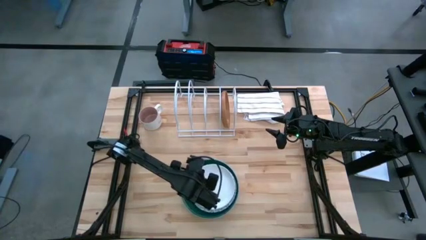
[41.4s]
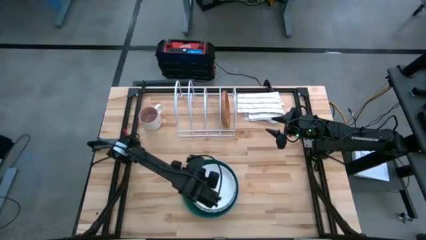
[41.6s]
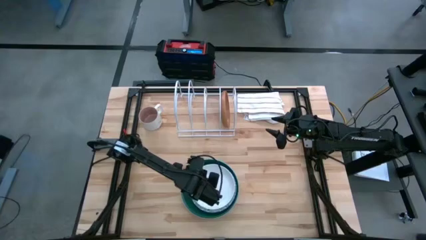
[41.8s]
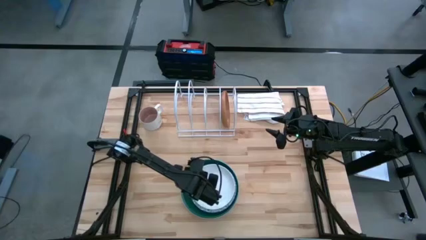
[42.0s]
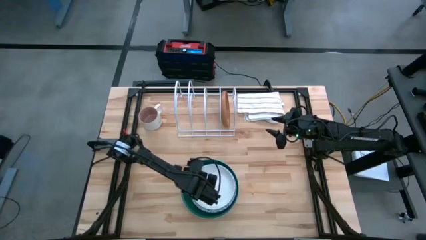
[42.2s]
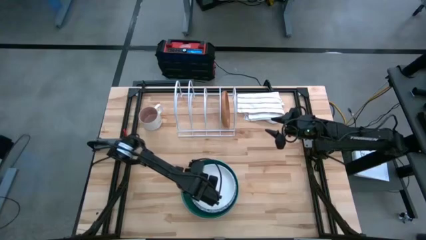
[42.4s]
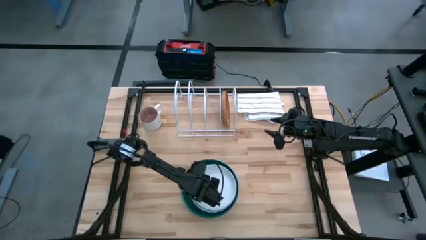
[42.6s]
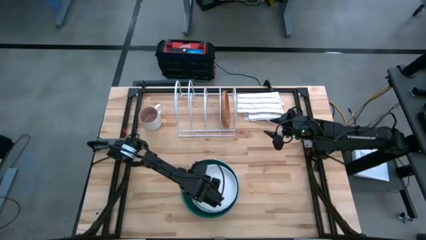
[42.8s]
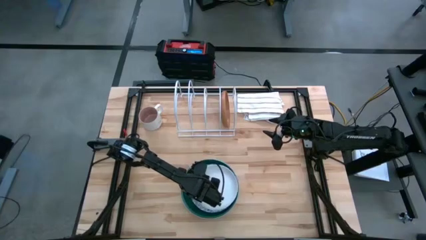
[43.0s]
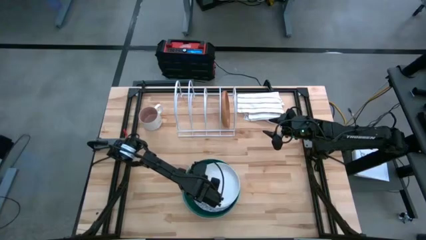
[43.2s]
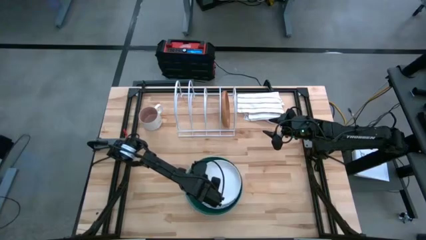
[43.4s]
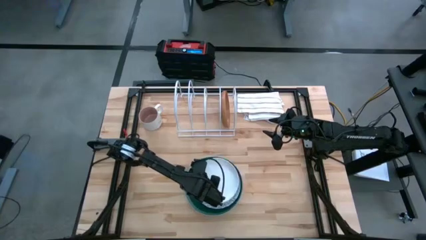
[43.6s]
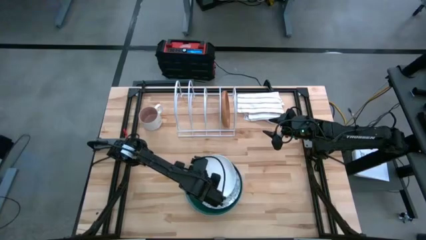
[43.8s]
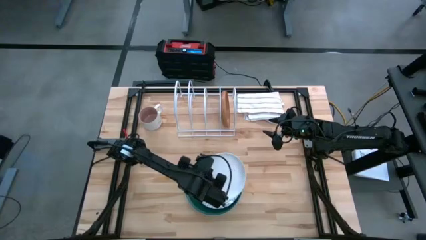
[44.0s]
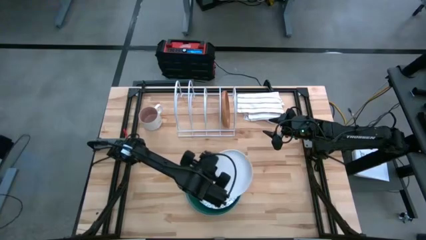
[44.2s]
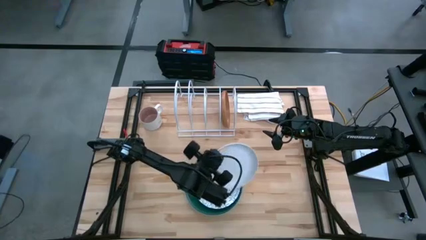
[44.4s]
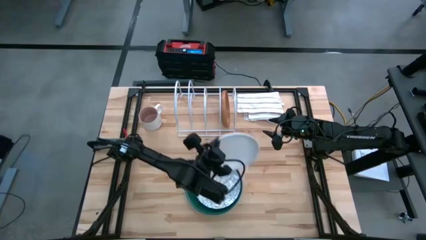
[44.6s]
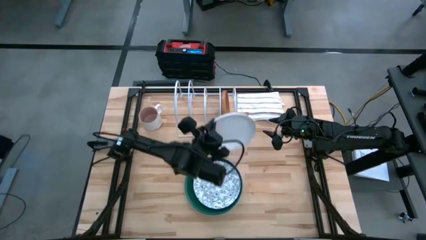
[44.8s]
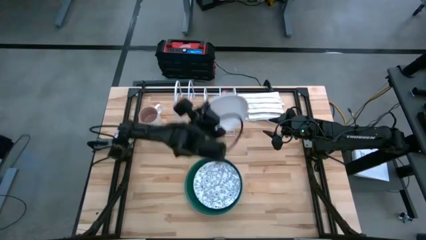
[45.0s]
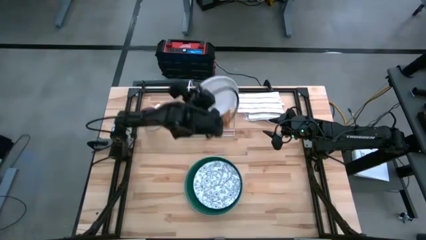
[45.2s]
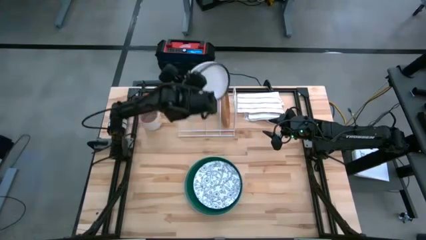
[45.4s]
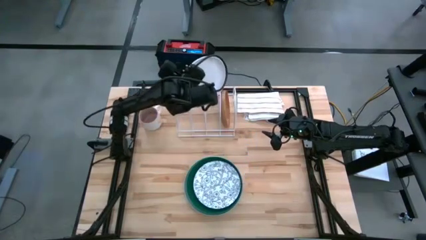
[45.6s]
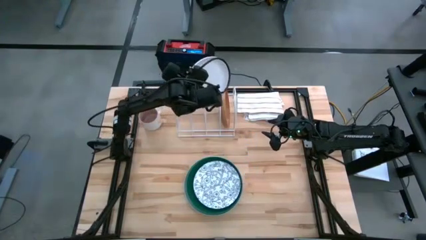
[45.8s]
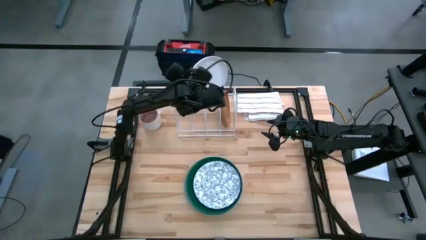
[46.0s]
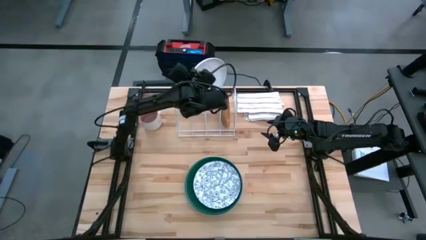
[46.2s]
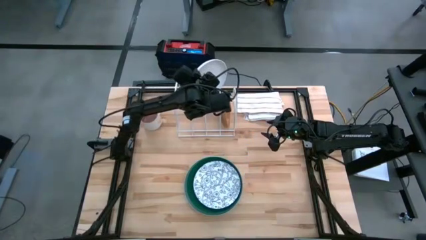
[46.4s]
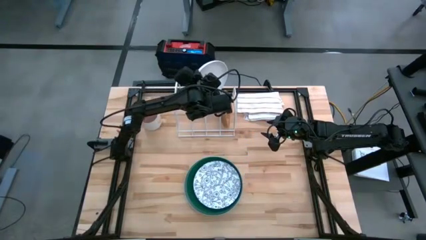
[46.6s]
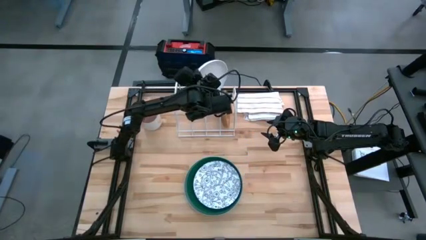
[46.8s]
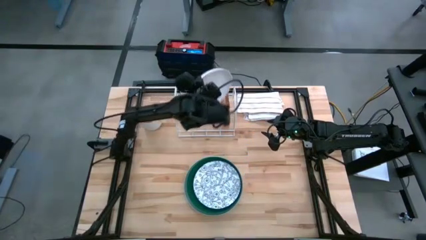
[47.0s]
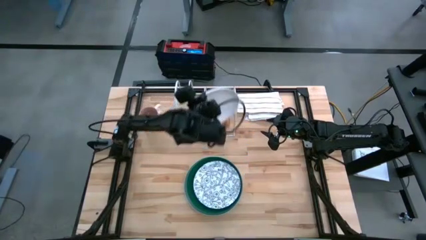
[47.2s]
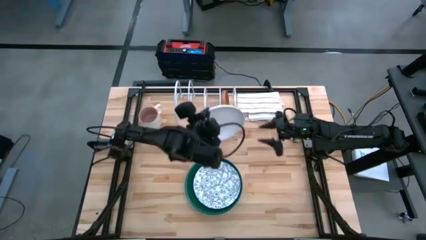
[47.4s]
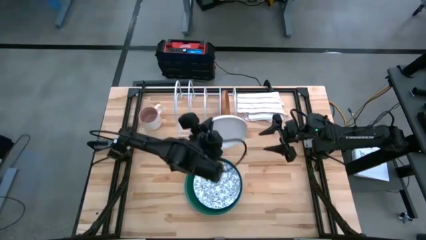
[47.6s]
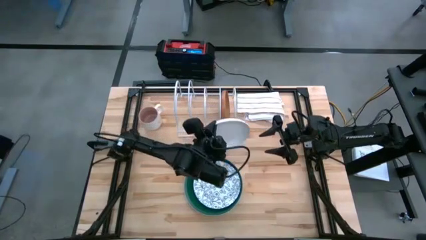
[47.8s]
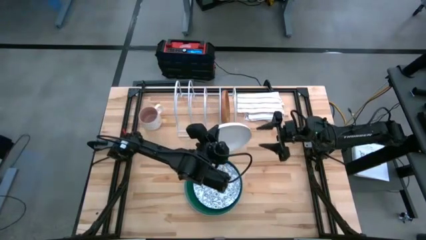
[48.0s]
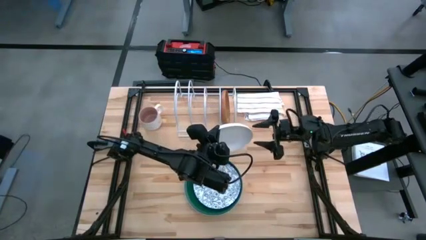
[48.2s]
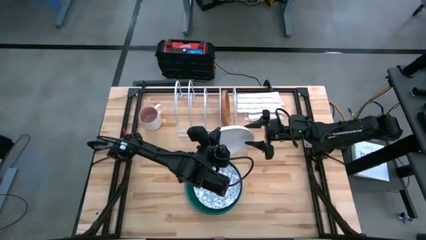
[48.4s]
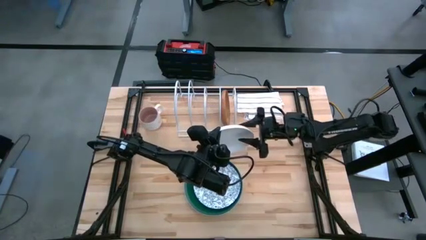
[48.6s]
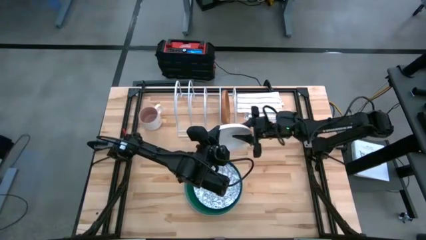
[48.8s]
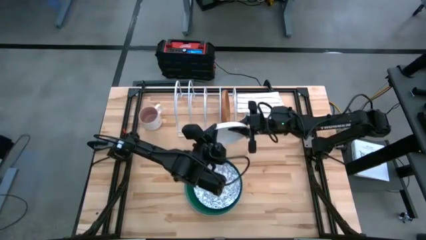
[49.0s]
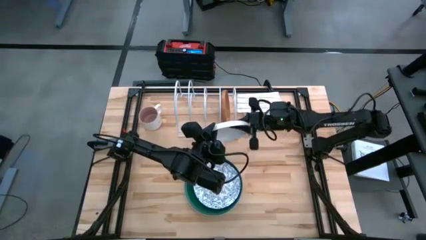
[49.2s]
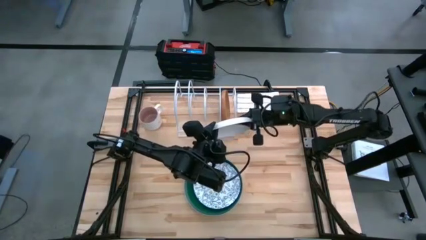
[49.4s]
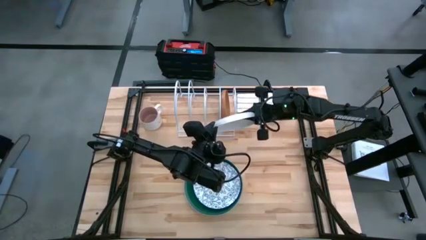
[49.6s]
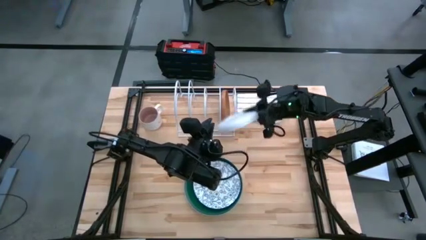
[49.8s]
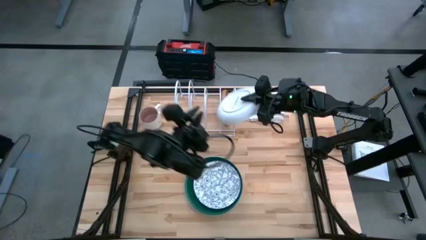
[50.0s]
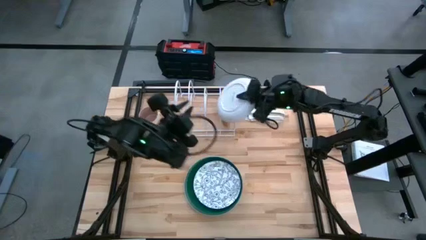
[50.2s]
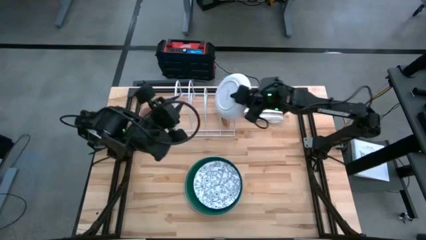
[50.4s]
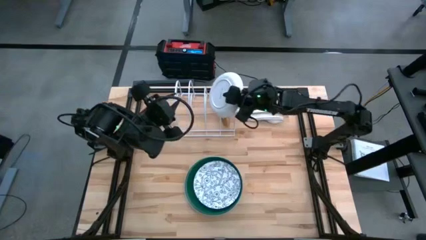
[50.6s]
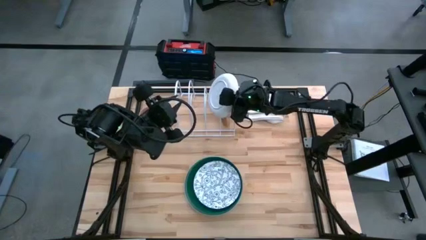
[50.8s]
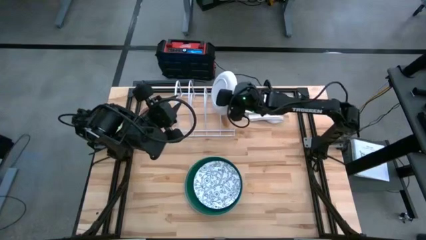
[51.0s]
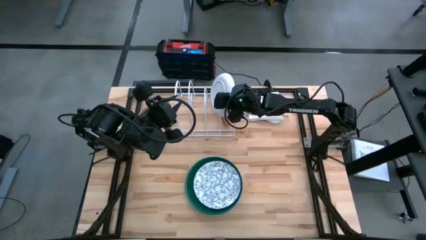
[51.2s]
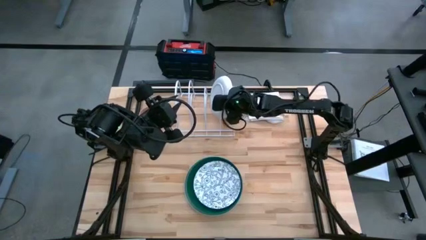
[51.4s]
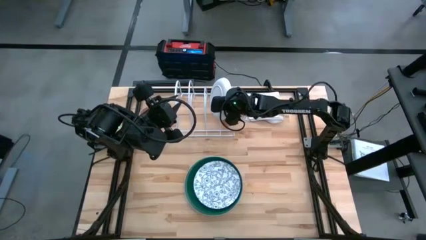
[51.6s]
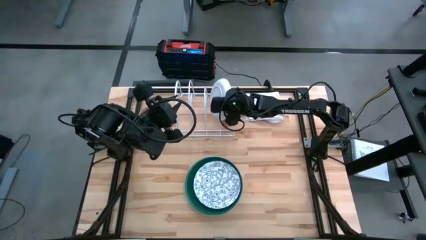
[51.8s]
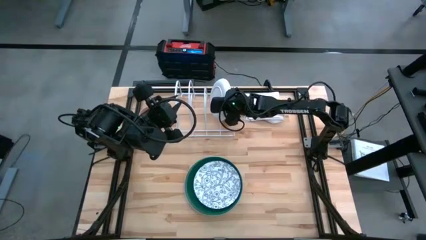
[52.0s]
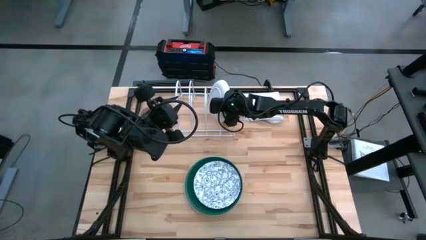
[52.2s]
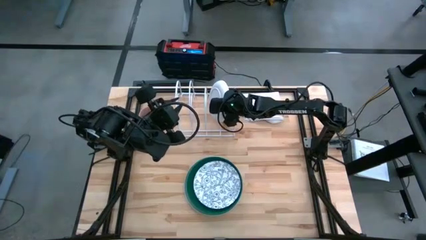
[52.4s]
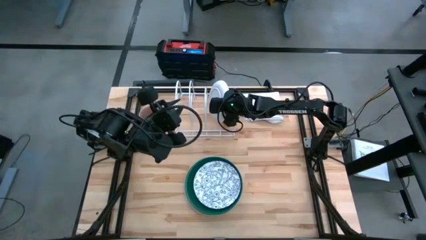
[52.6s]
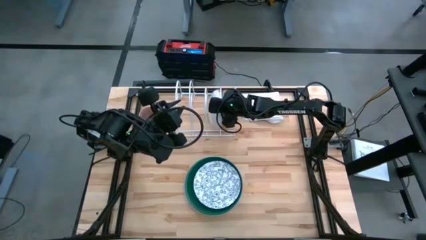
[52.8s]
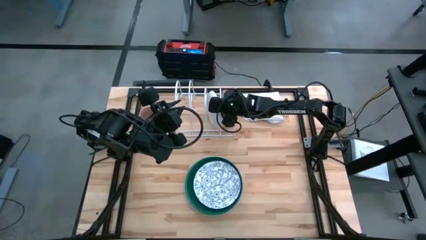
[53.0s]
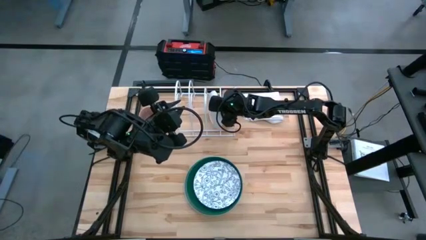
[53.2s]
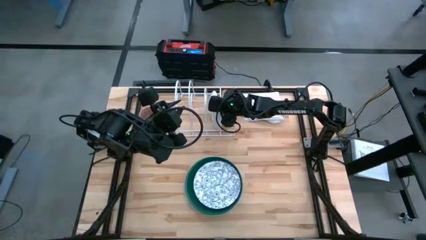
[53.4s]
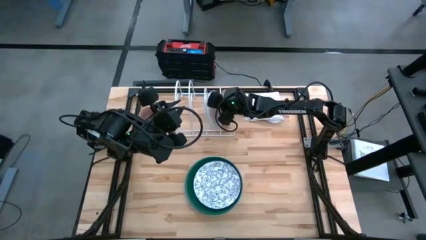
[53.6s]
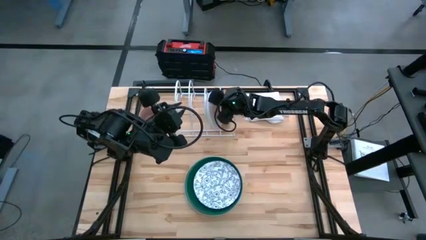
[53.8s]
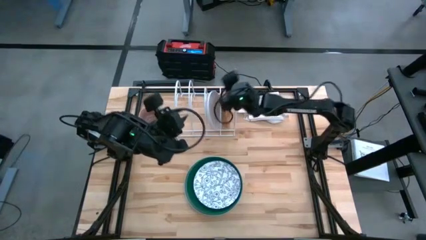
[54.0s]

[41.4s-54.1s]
Task: Sort dishes
Put the white plate into the dishwasher rack
